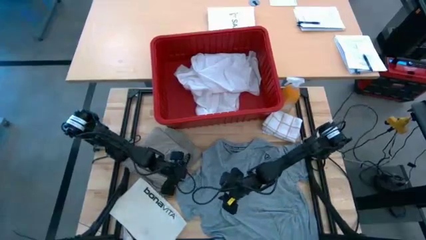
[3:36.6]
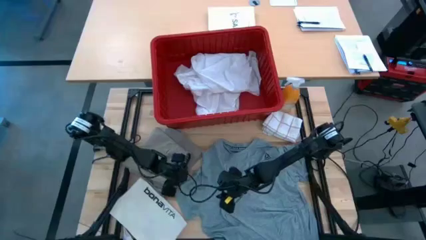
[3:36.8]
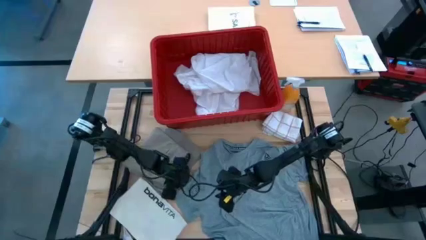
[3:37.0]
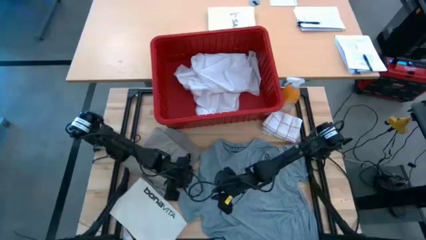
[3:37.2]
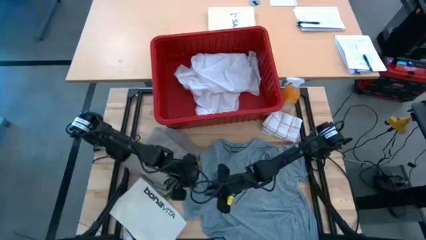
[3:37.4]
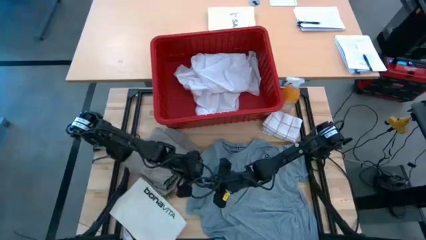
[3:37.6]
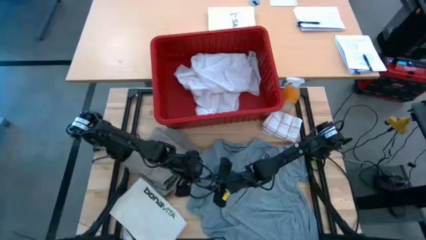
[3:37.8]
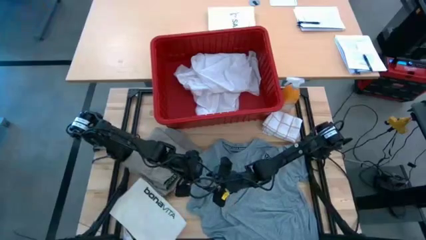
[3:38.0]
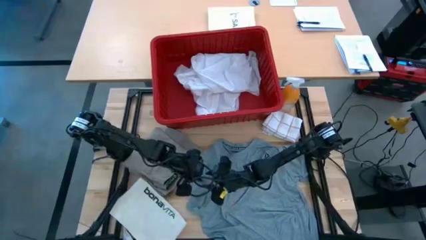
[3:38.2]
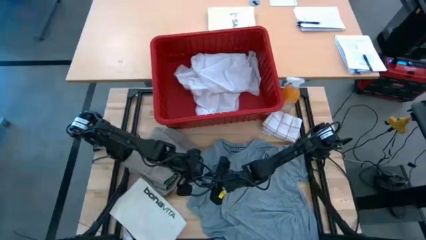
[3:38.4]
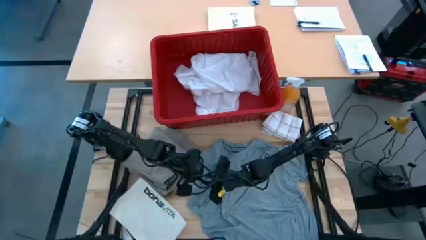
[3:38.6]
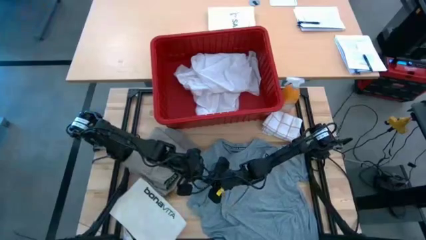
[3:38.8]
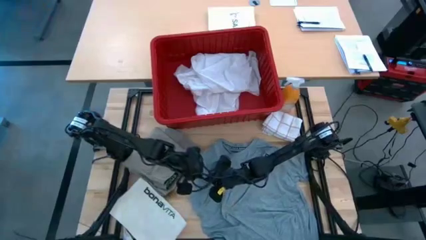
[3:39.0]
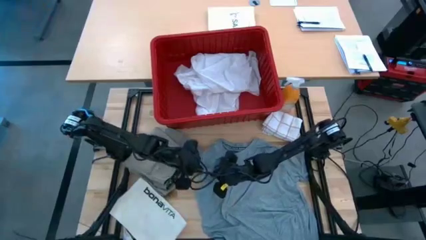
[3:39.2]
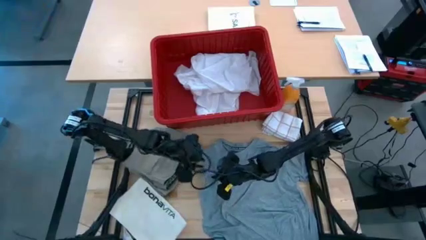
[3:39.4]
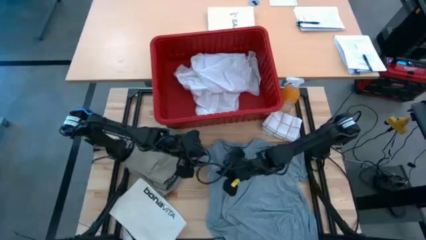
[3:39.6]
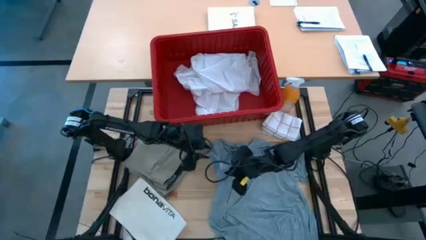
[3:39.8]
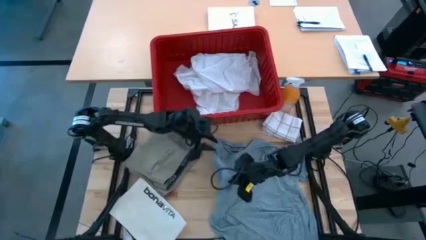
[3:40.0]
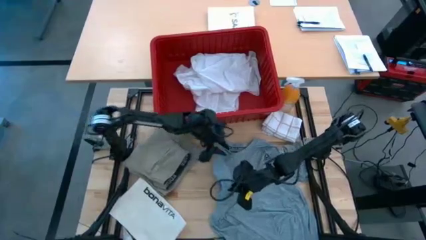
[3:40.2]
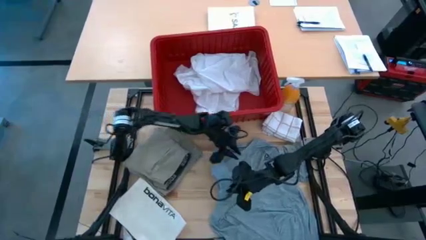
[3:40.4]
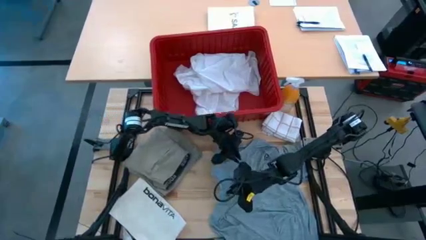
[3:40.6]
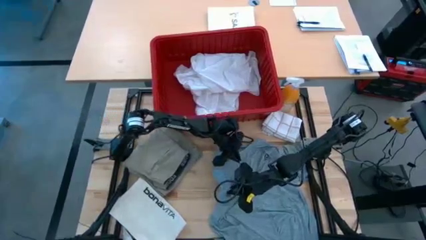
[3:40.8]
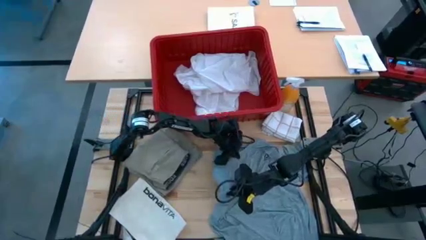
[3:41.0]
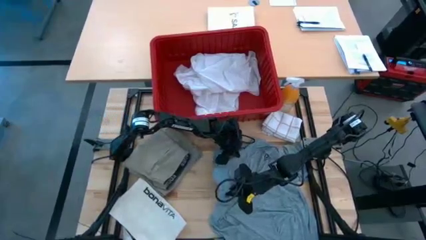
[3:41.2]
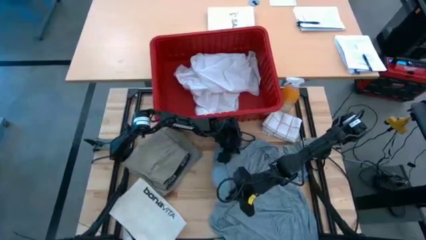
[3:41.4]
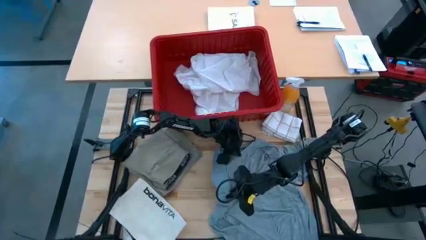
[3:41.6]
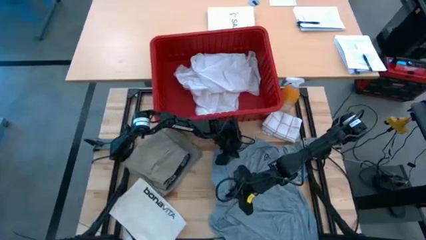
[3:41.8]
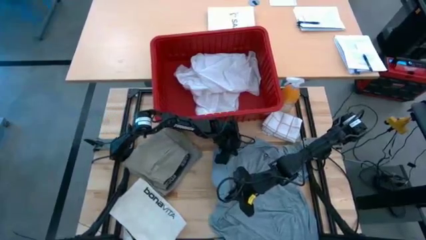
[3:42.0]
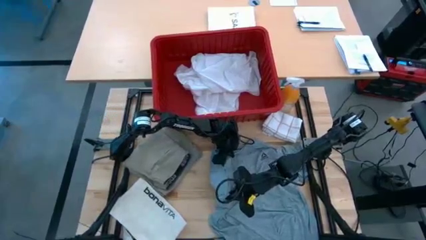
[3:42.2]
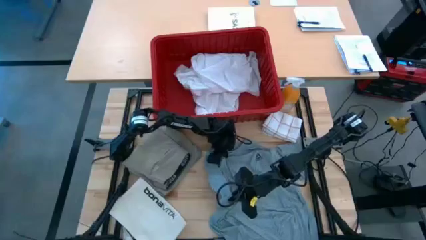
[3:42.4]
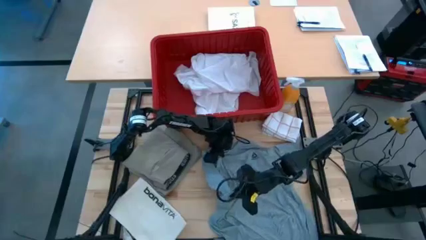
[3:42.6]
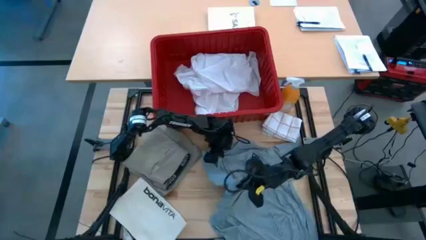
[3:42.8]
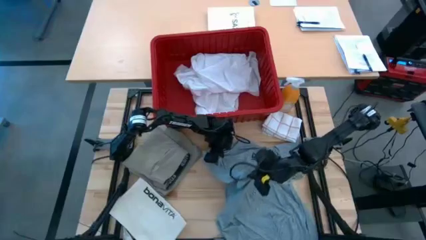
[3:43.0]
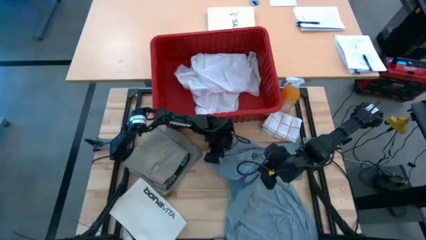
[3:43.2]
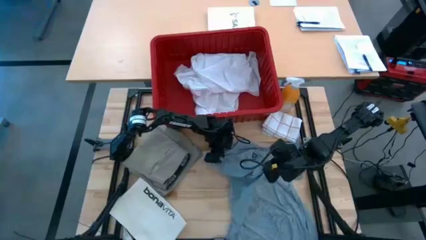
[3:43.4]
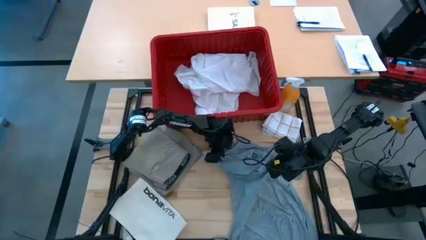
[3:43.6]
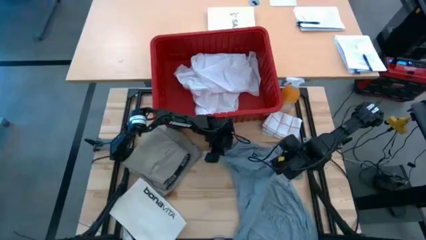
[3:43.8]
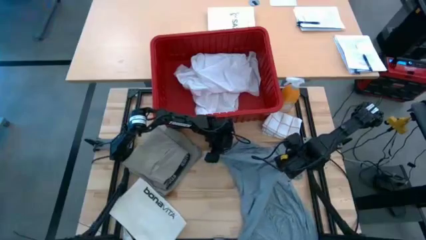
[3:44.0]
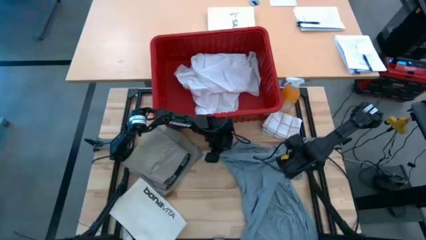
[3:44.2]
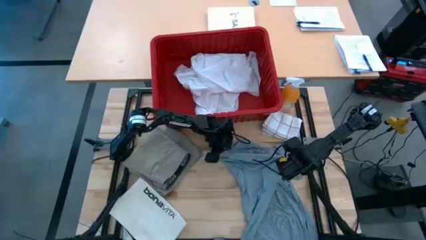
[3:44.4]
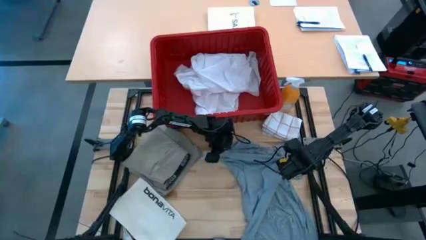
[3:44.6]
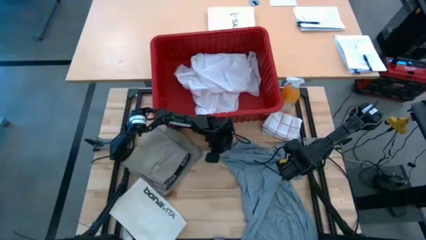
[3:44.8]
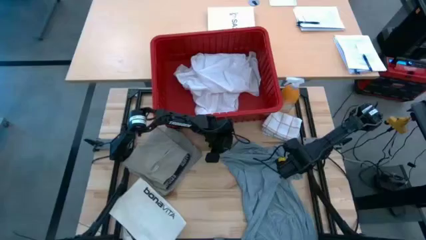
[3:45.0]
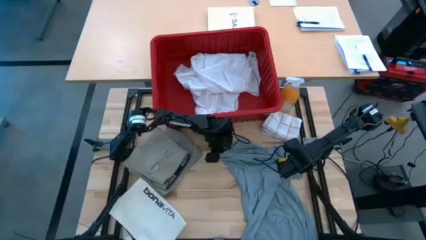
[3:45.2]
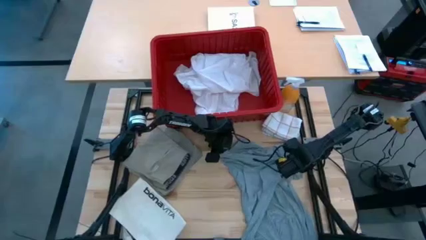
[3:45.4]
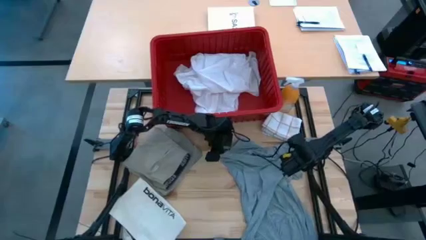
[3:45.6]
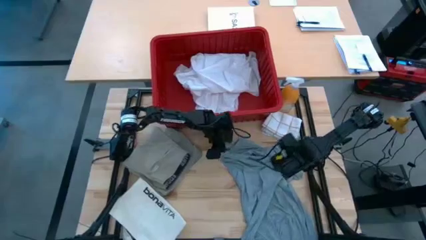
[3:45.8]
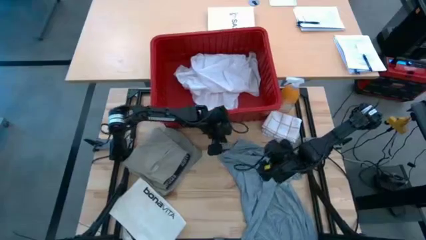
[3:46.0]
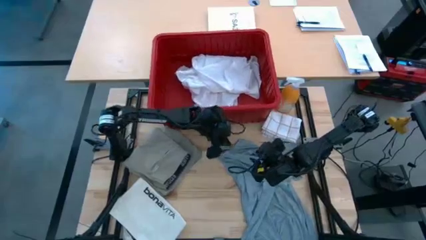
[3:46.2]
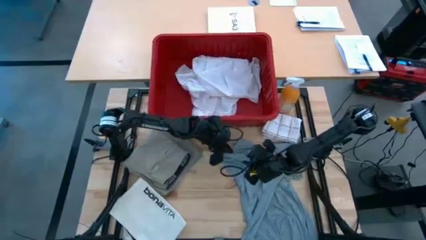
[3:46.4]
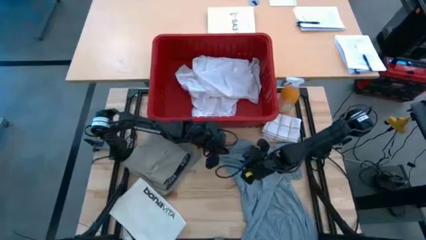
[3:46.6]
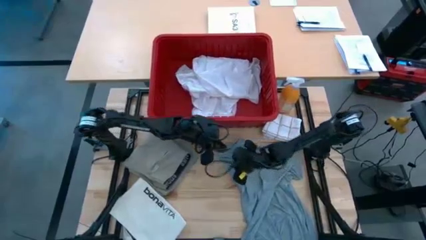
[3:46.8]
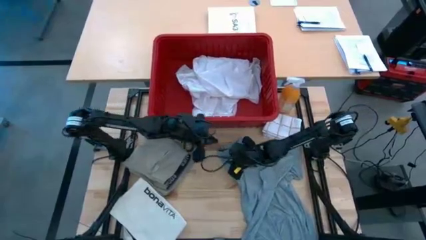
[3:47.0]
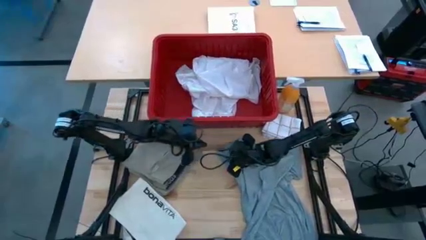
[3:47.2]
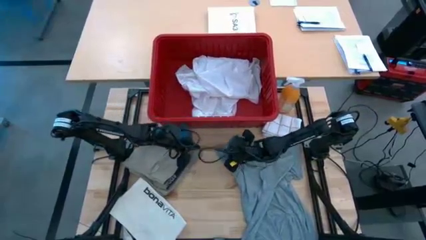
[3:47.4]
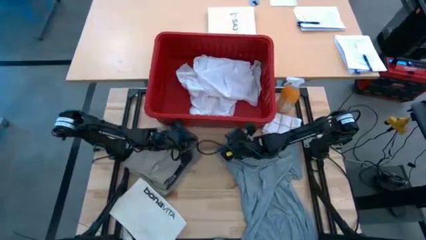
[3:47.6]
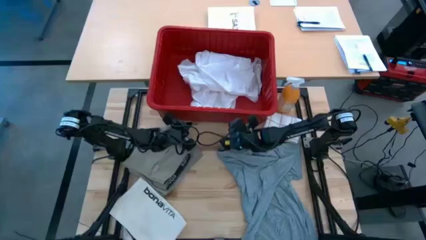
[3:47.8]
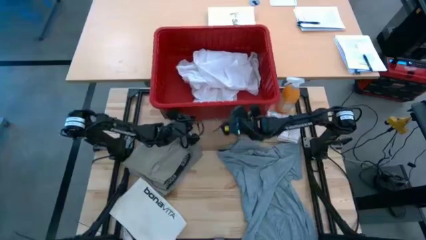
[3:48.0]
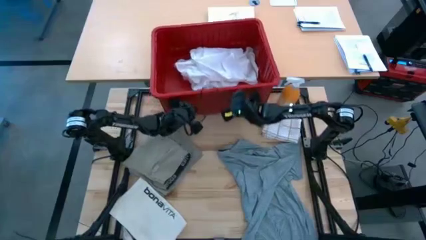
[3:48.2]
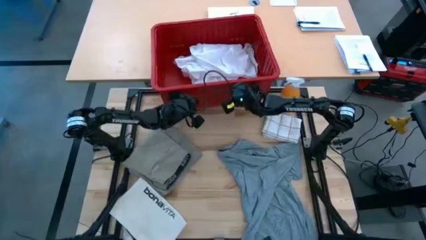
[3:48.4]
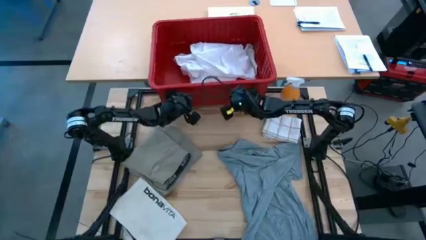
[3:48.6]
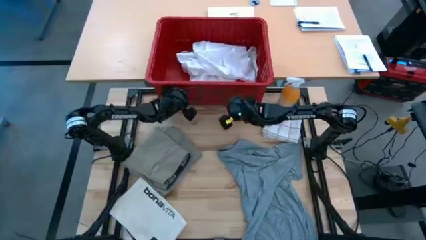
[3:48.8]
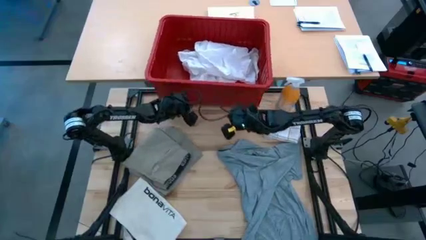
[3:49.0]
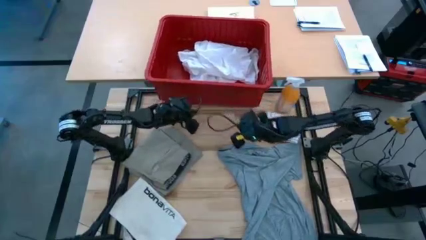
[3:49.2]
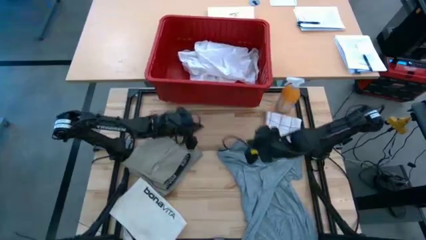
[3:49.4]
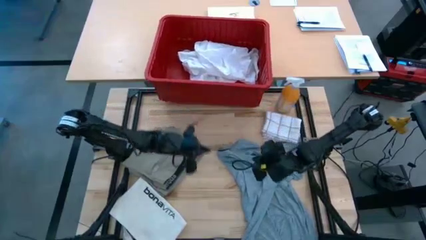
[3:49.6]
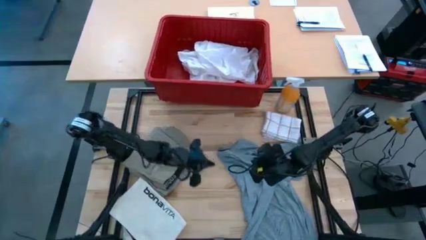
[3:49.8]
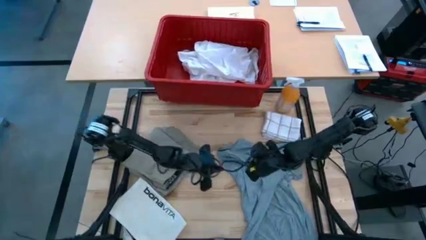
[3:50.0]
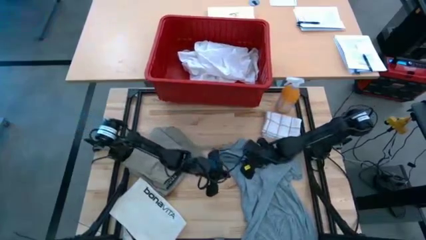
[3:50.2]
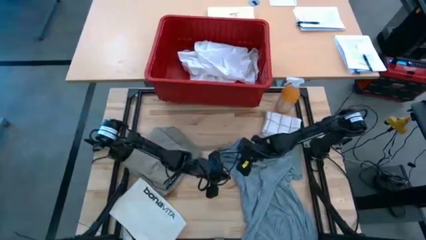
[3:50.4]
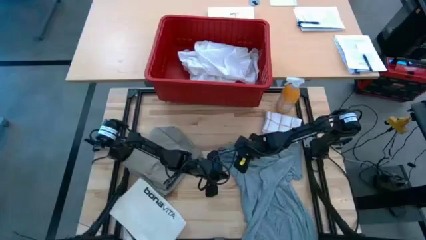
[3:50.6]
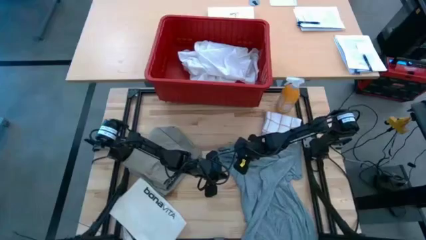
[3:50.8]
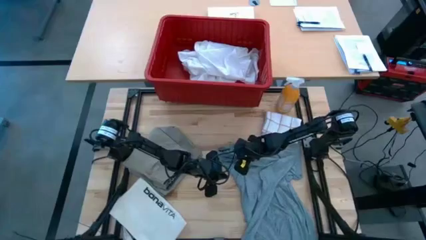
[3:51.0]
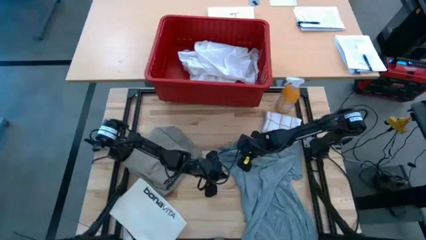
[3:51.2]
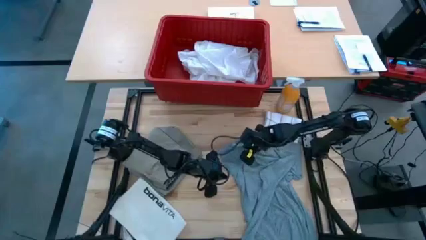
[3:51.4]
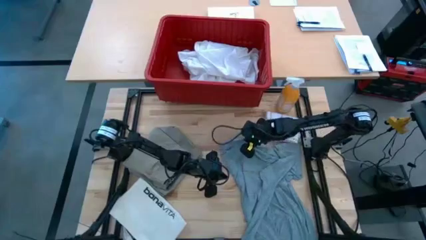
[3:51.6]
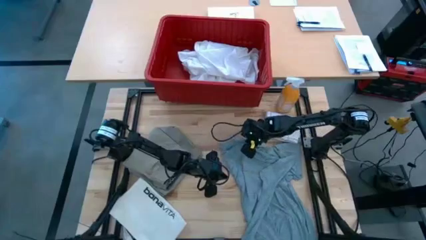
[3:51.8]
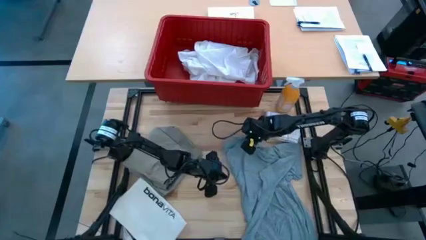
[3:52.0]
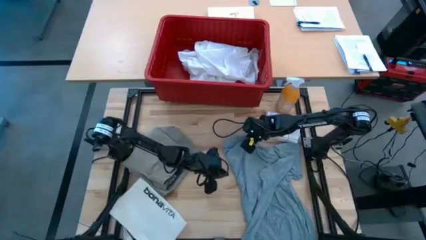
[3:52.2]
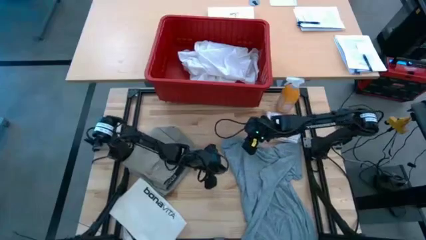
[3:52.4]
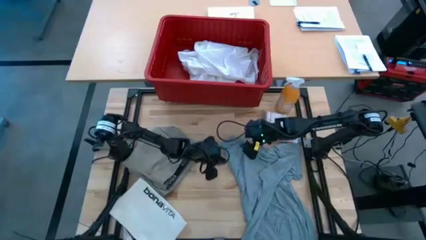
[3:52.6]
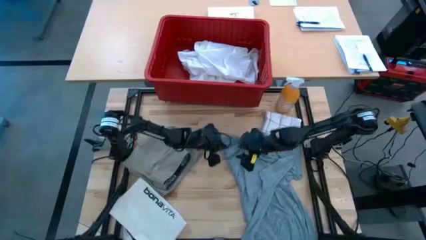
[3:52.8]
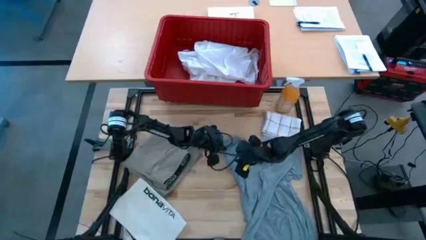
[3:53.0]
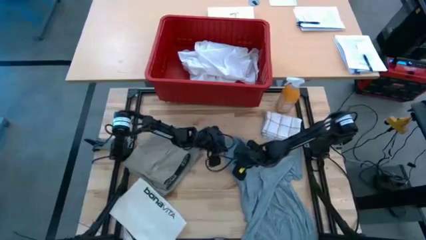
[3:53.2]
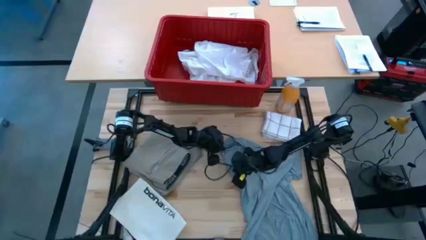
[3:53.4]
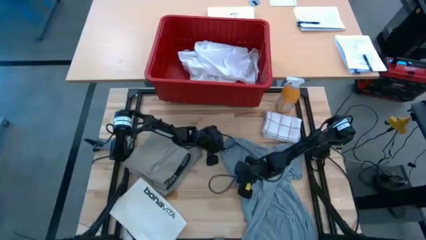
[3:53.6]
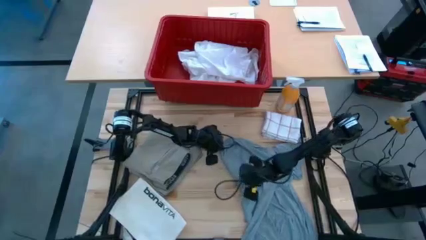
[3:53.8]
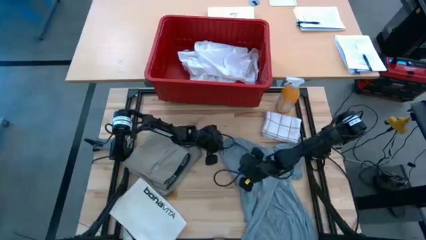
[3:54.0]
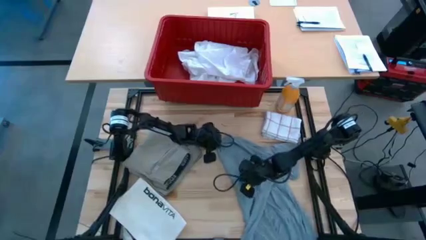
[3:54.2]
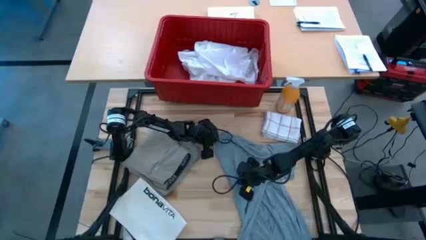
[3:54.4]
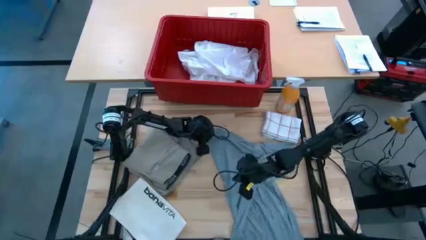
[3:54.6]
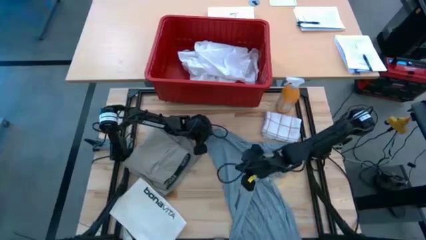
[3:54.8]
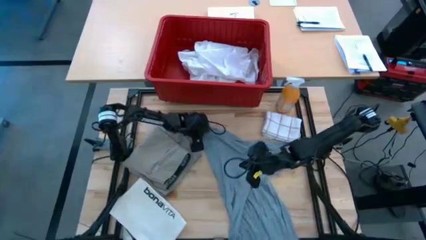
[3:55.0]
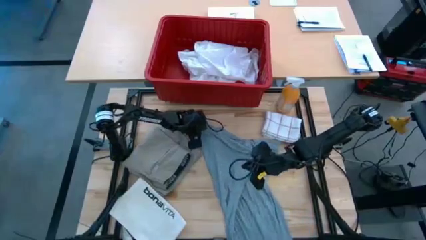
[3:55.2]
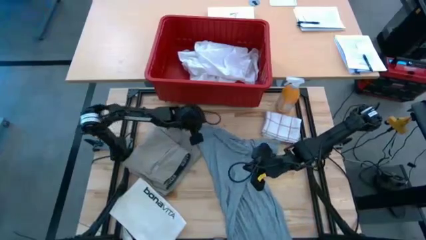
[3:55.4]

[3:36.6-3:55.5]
Task: Fold laundry
Fold the gray shirt
